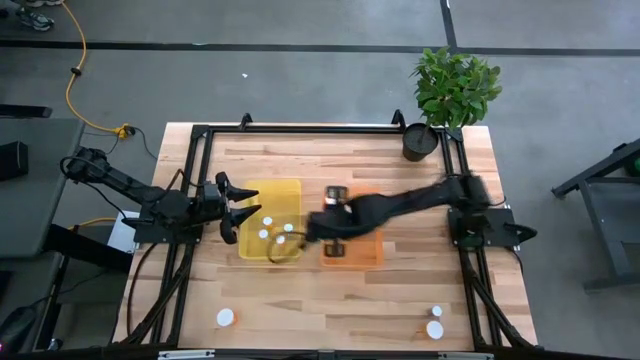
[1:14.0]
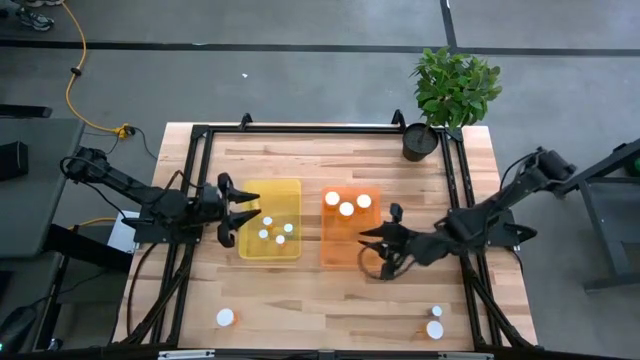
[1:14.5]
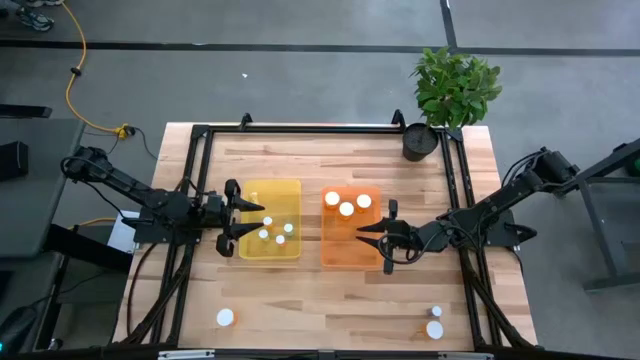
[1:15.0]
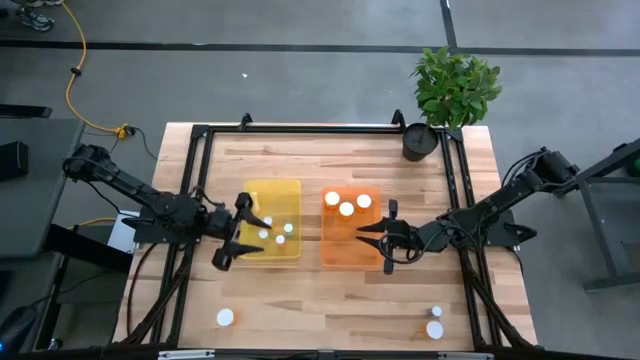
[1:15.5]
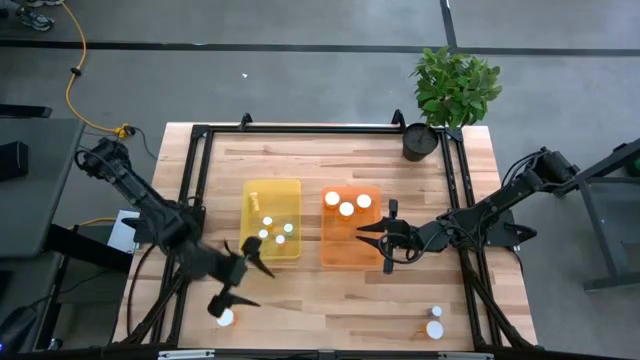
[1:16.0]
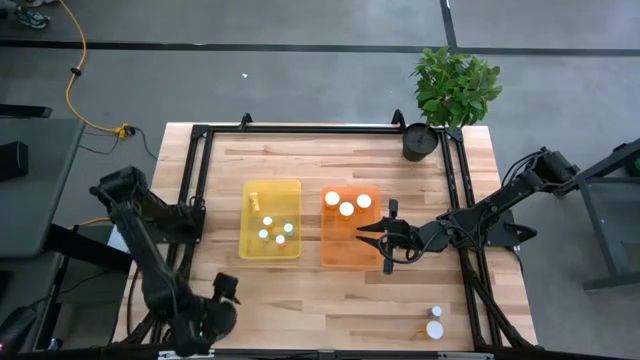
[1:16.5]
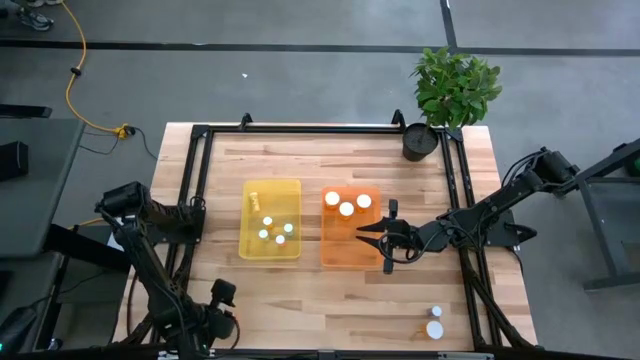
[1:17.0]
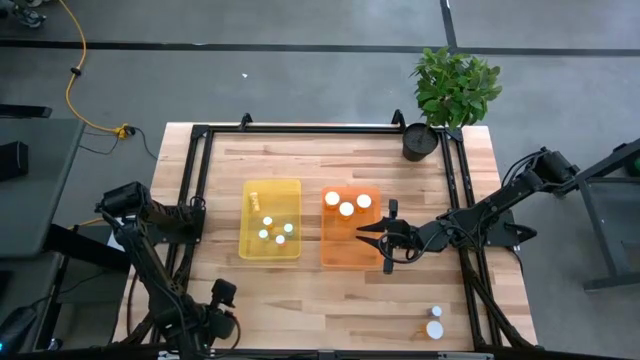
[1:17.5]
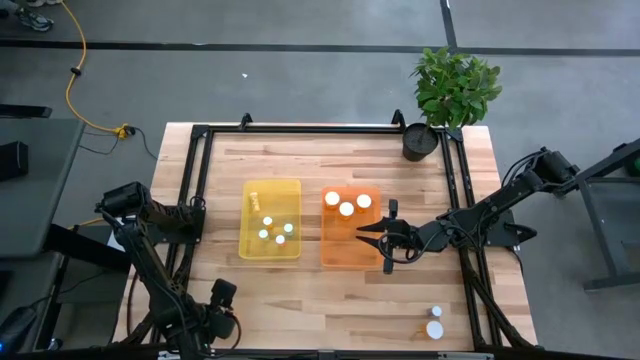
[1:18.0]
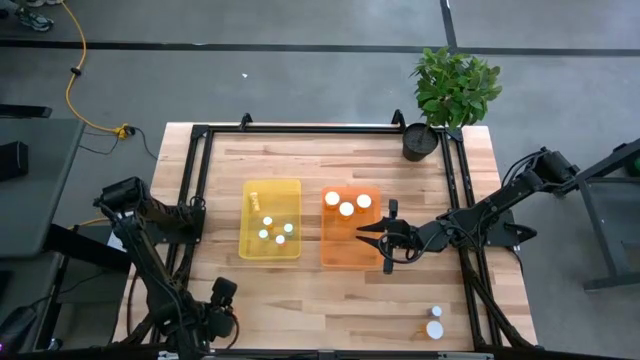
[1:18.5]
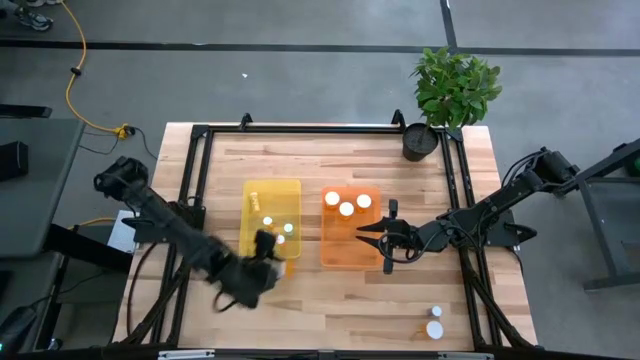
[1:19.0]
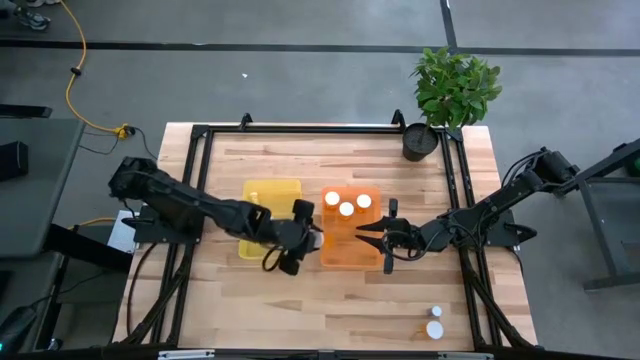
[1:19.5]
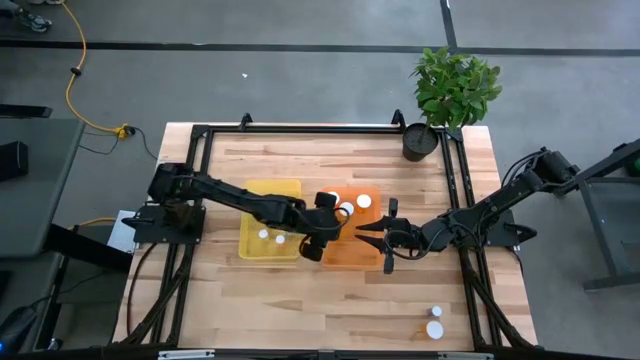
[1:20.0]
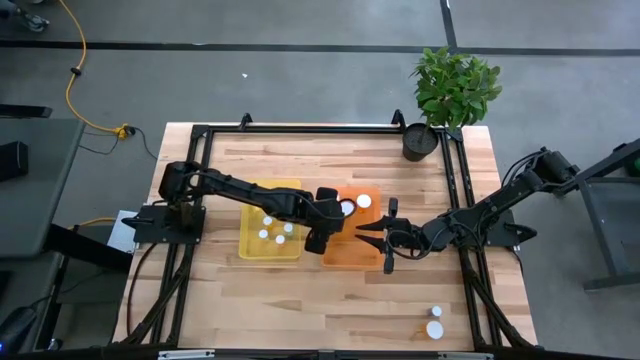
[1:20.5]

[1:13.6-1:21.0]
Task: Pick and place medicine bottles into bin by pill shape (circle, oval)
Put the orange capsule bottle into the orange bin

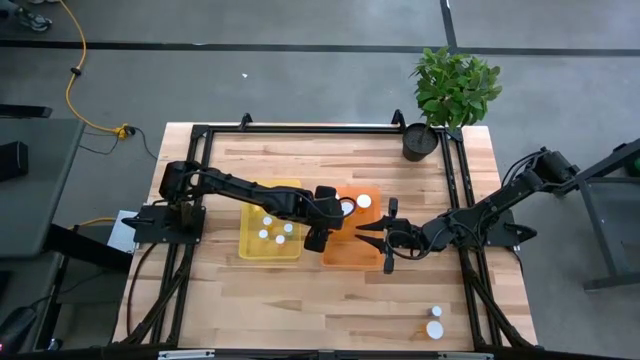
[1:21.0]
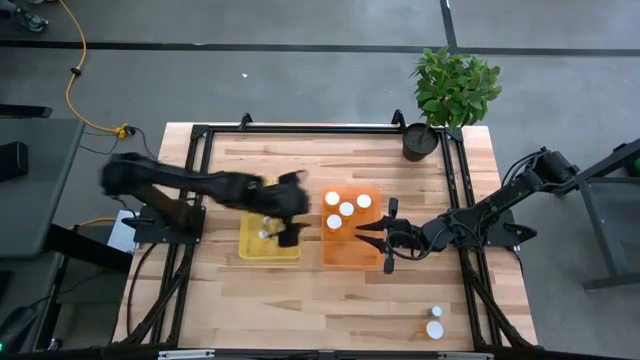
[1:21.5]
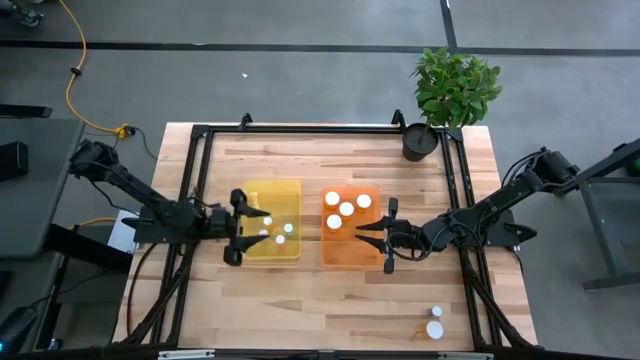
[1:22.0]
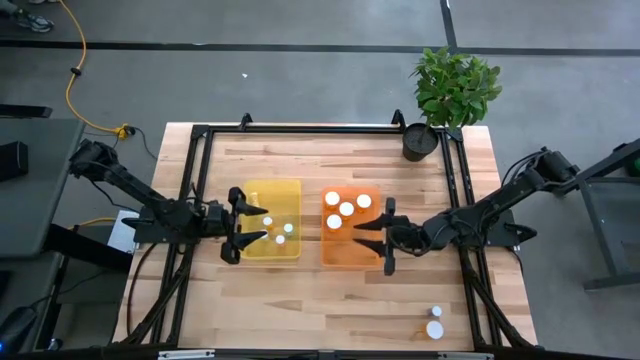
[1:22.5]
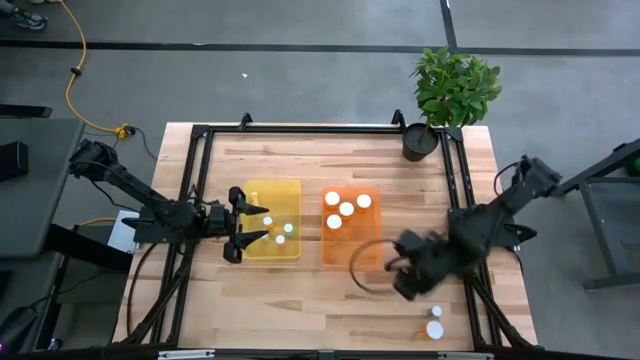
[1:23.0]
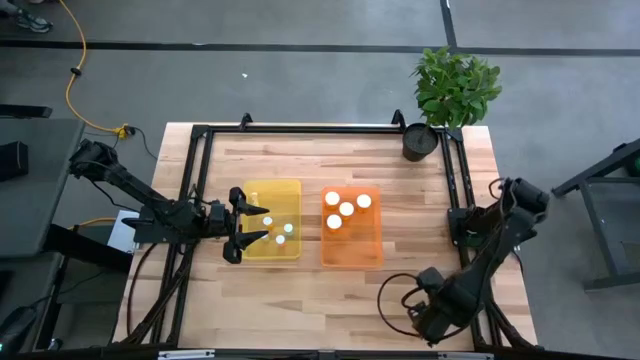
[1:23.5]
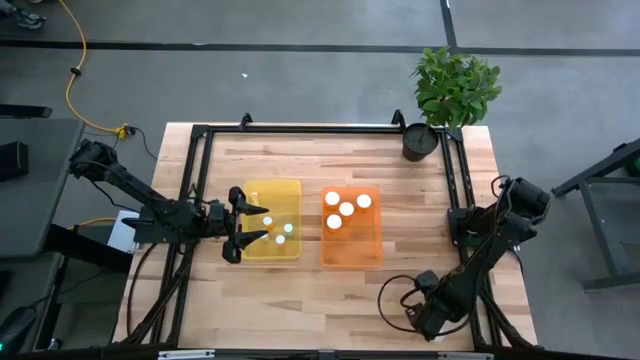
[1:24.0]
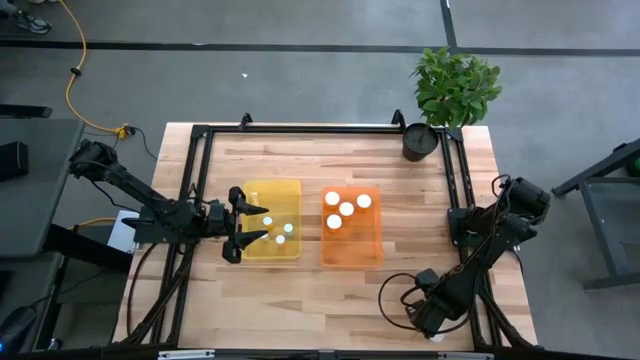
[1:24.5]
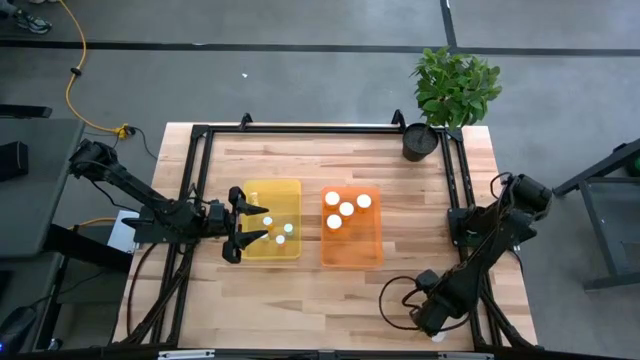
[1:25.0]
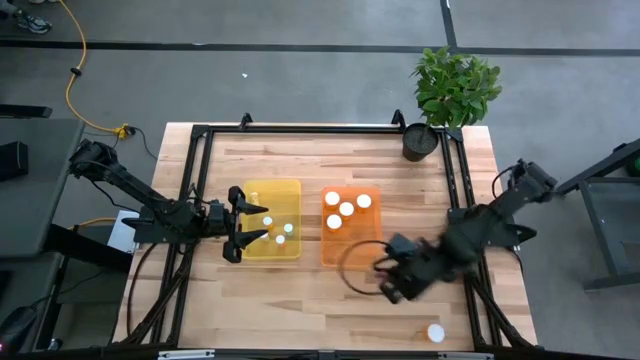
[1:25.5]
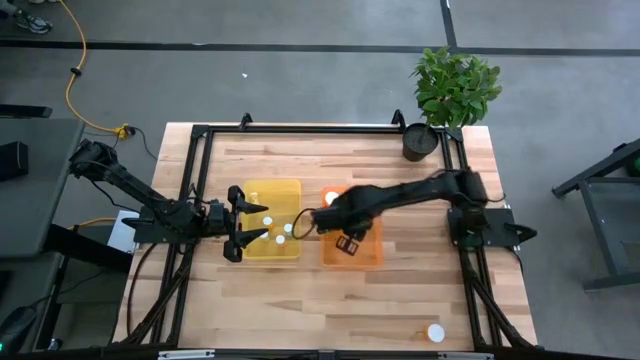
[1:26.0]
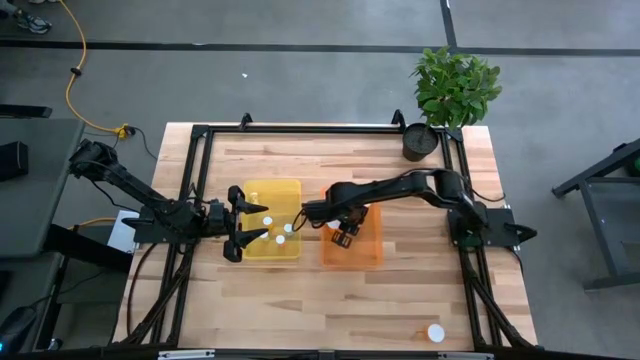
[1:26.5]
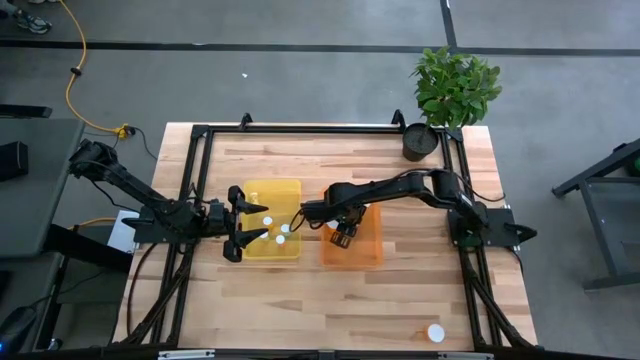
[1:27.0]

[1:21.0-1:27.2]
Put the blue capsule bottle into the orange bin

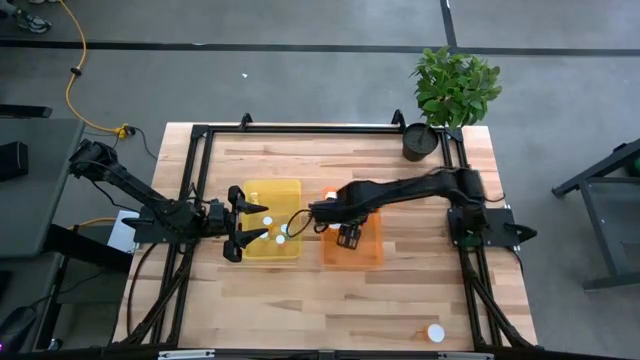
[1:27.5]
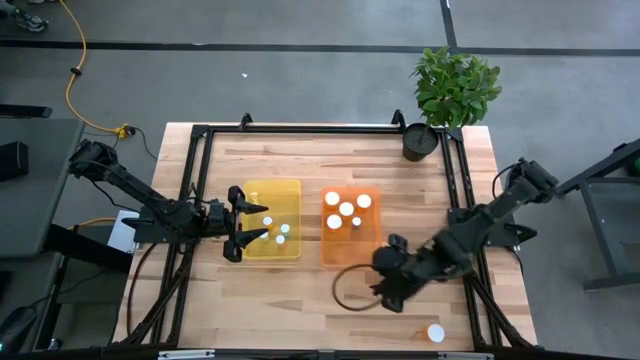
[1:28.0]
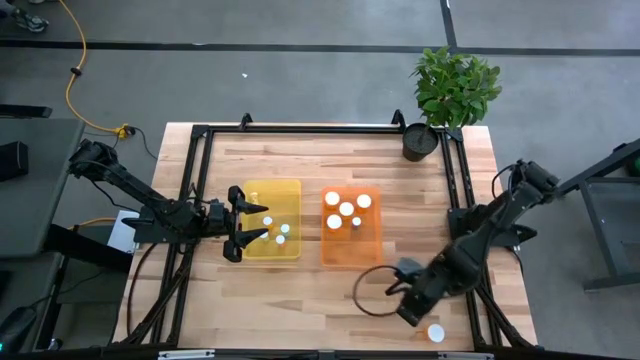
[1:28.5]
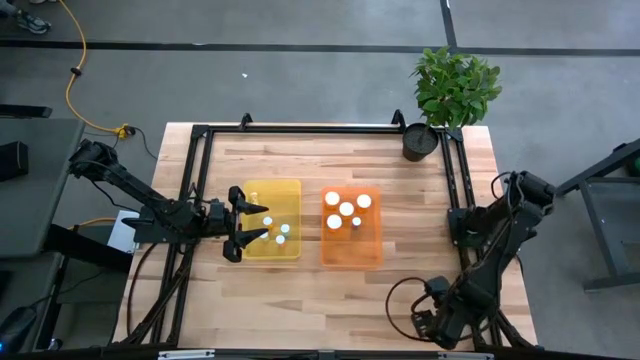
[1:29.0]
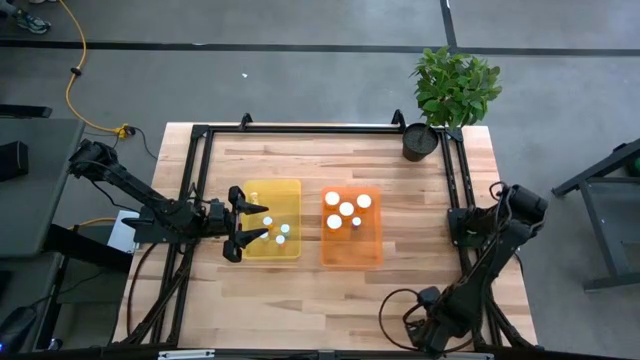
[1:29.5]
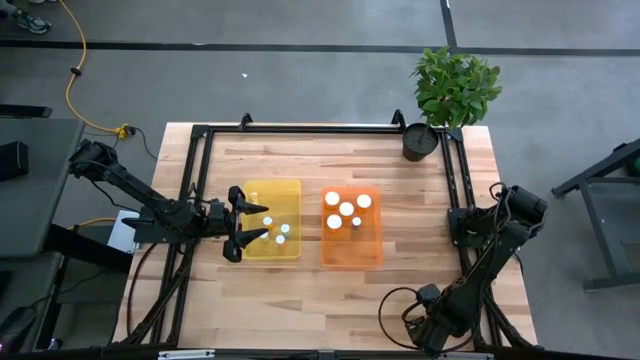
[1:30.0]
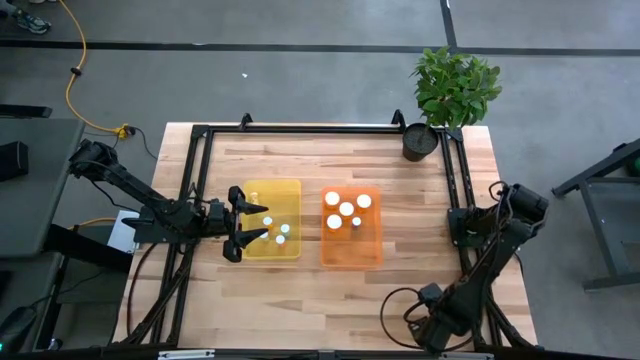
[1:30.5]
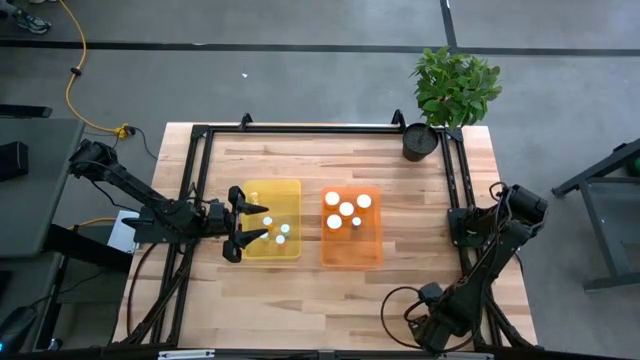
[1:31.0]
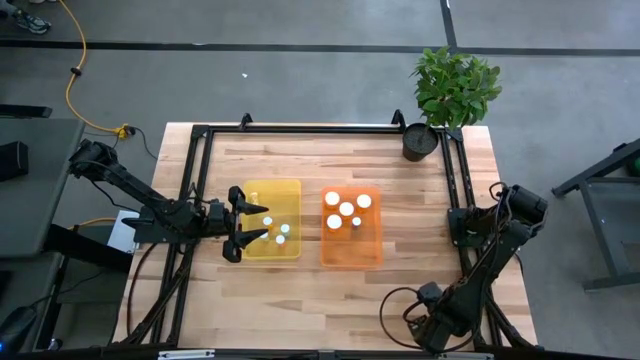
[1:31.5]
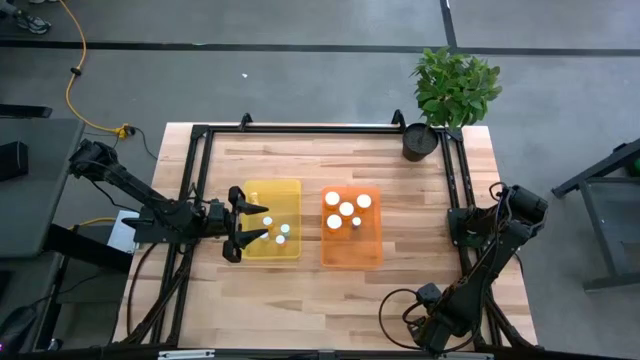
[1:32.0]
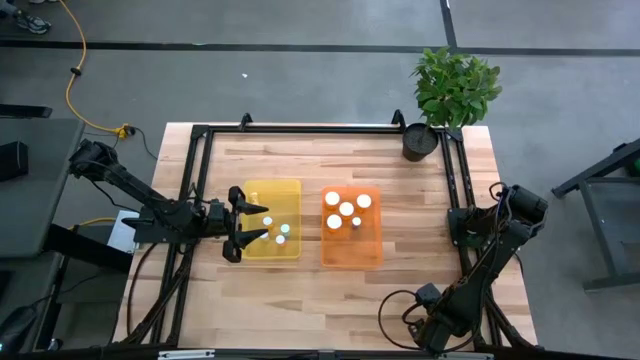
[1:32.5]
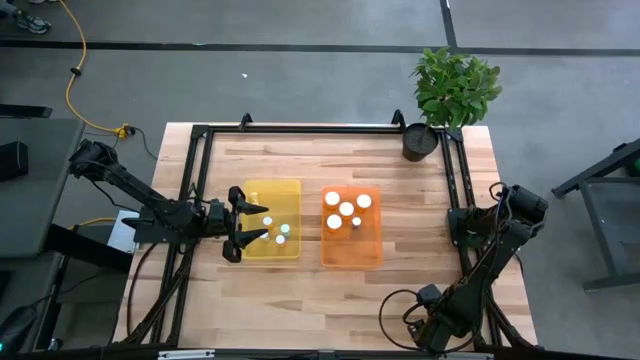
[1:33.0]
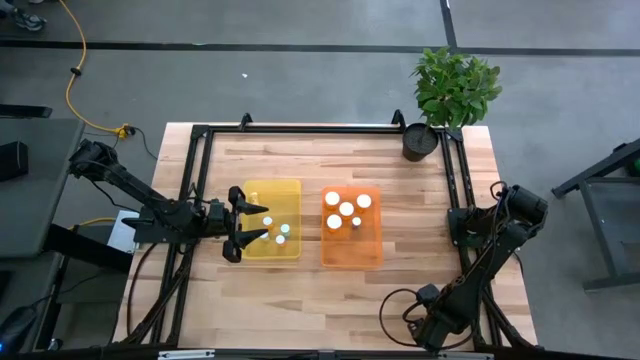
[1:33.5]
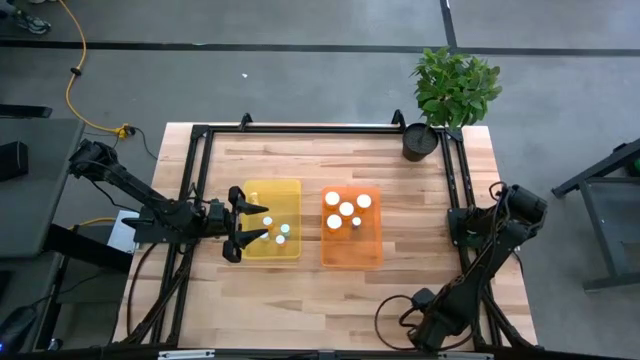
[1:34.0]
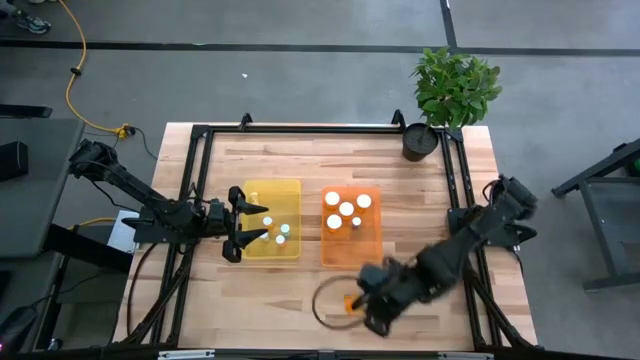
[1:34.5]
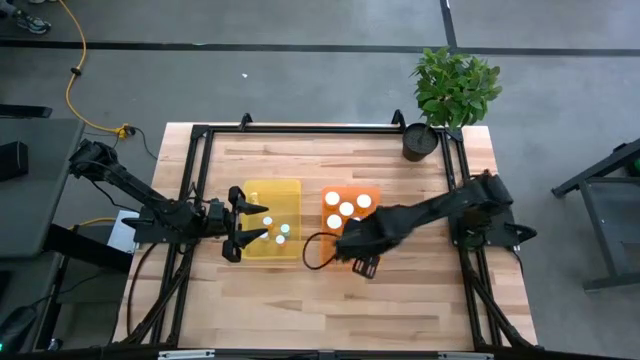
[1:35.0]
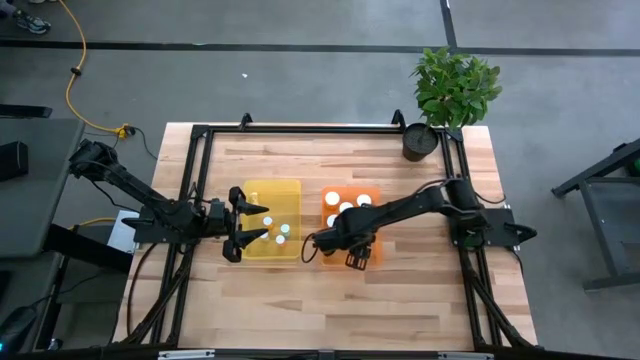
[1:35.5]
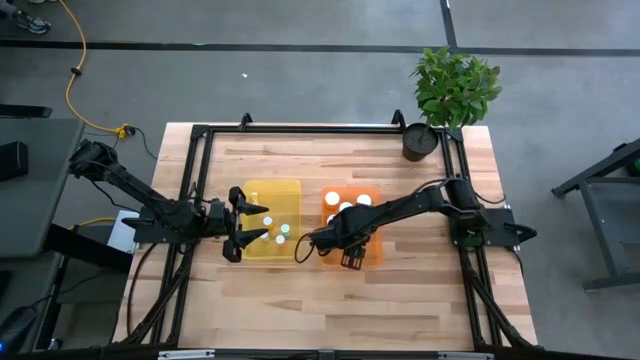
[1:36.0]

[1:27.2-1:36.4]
Put the orange capsule bottle into the orange bin
